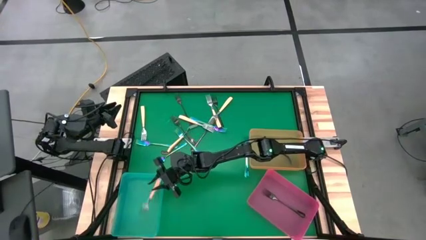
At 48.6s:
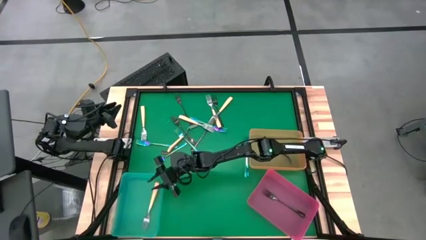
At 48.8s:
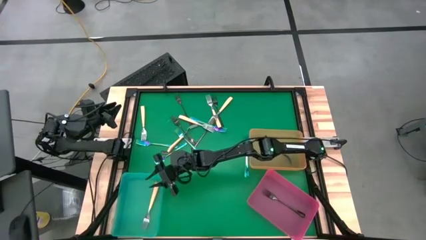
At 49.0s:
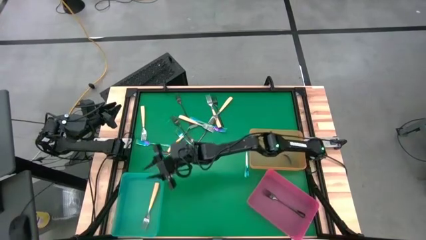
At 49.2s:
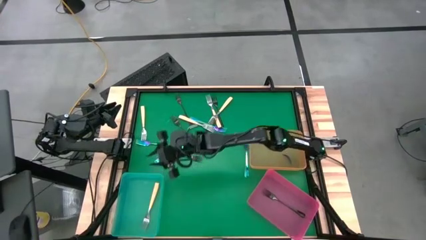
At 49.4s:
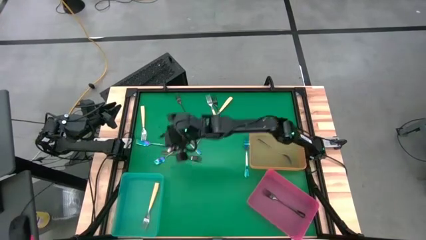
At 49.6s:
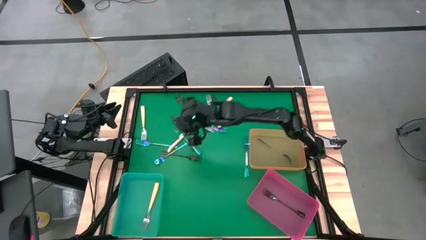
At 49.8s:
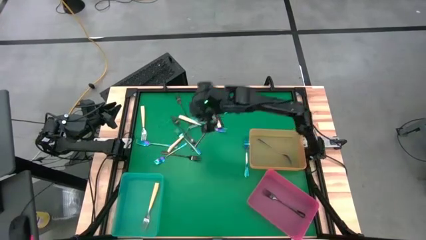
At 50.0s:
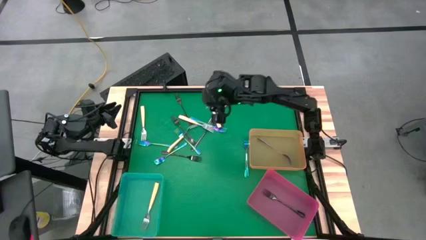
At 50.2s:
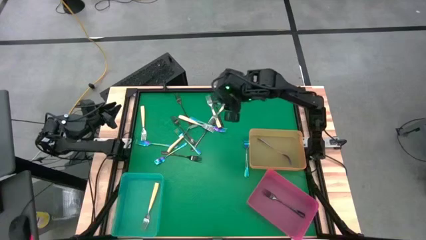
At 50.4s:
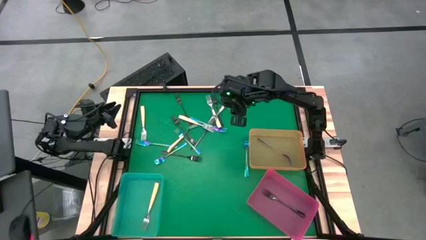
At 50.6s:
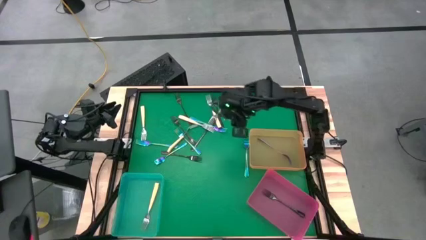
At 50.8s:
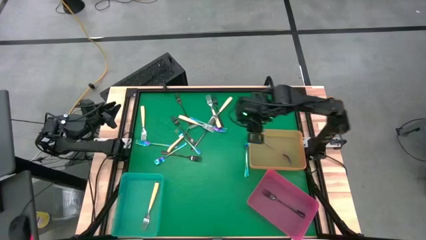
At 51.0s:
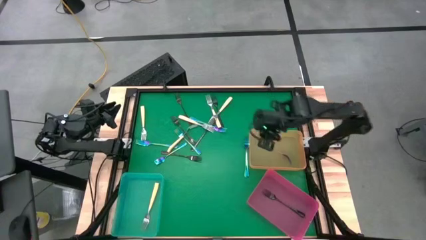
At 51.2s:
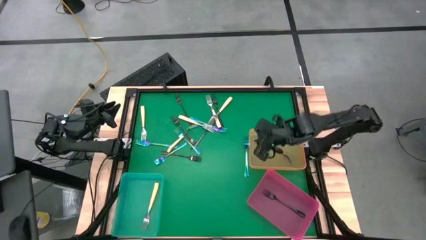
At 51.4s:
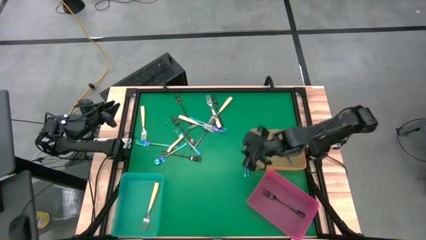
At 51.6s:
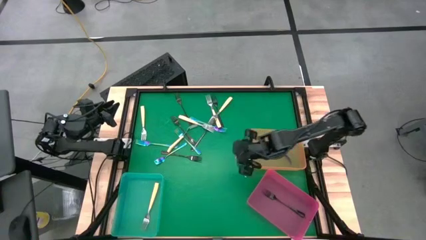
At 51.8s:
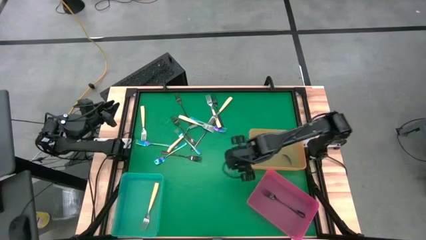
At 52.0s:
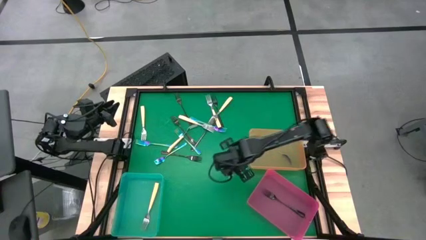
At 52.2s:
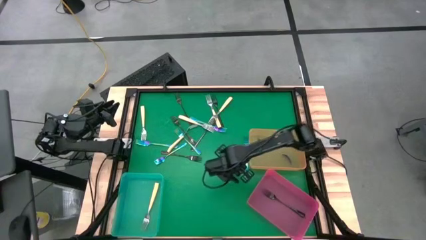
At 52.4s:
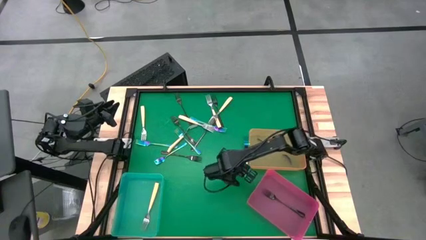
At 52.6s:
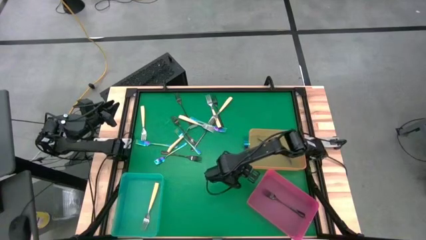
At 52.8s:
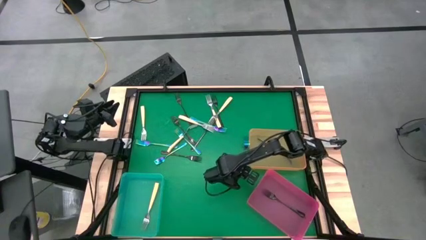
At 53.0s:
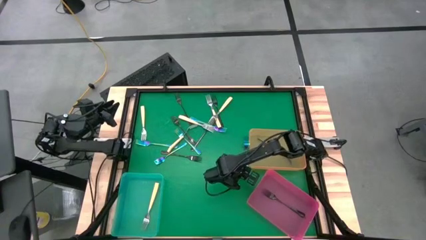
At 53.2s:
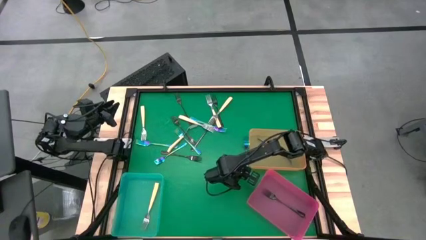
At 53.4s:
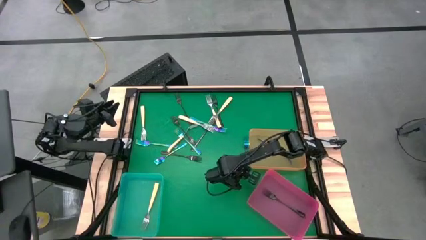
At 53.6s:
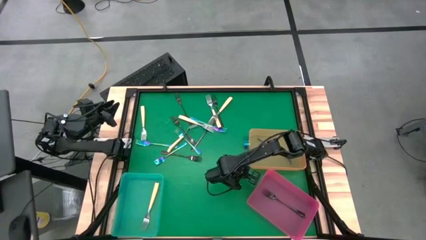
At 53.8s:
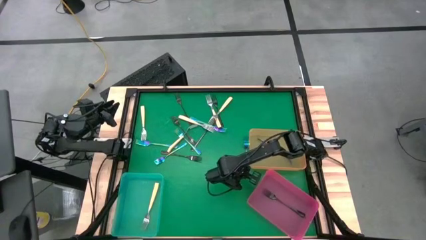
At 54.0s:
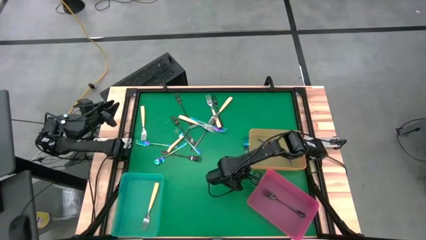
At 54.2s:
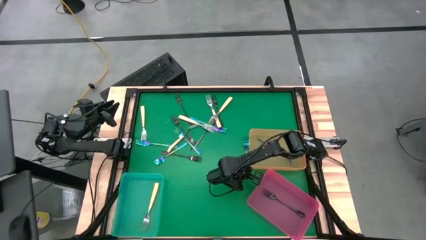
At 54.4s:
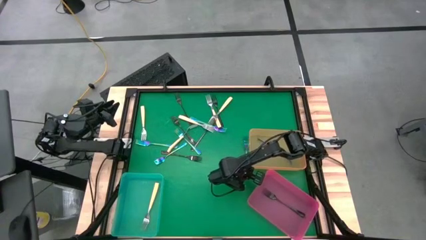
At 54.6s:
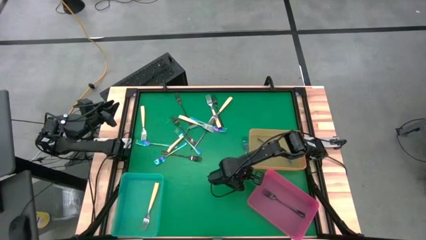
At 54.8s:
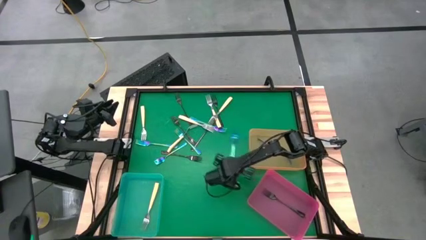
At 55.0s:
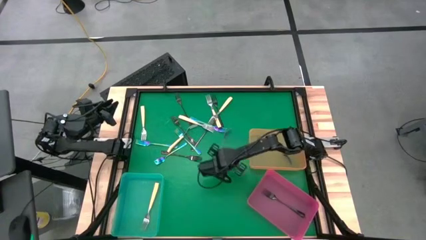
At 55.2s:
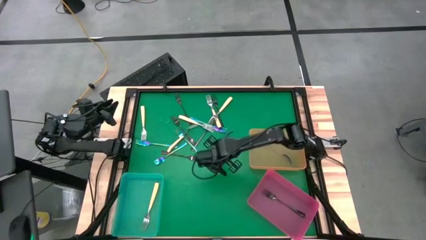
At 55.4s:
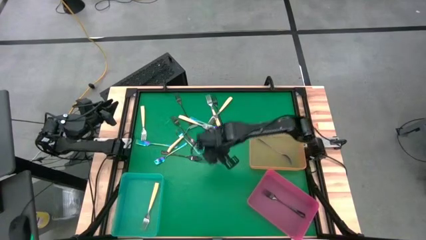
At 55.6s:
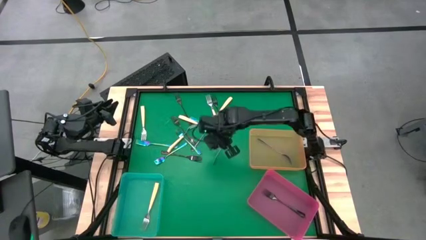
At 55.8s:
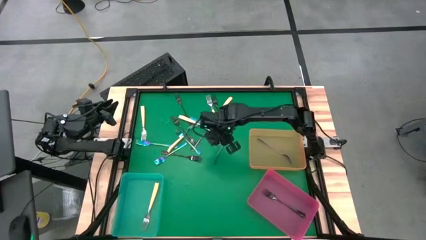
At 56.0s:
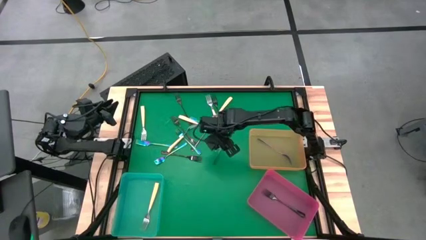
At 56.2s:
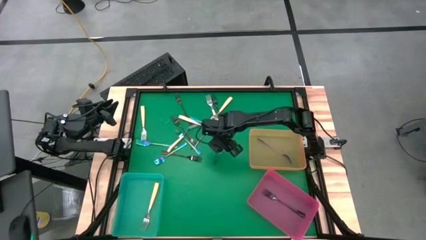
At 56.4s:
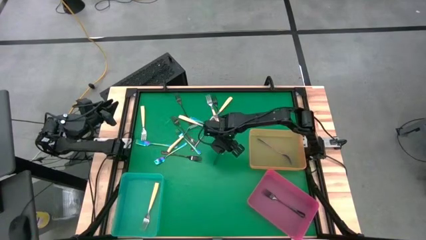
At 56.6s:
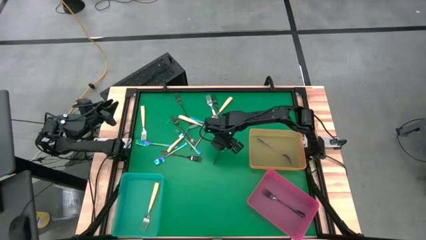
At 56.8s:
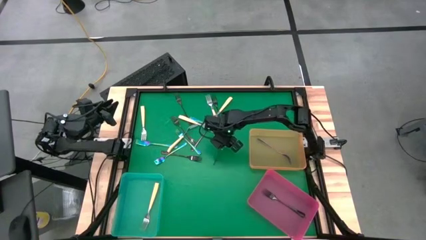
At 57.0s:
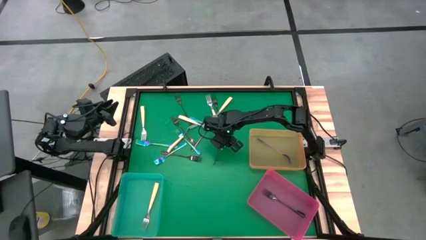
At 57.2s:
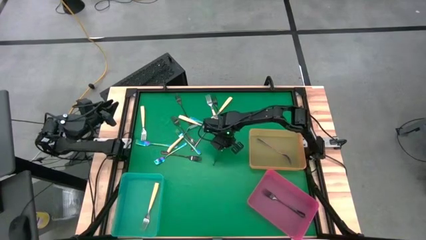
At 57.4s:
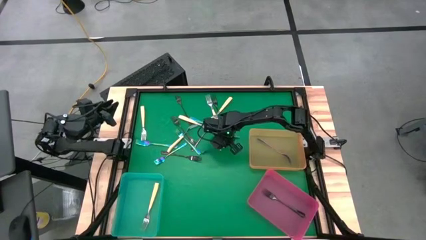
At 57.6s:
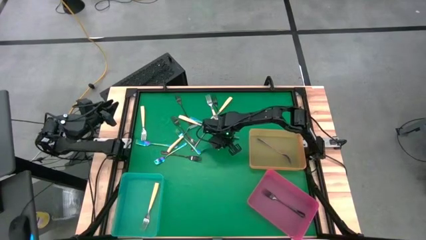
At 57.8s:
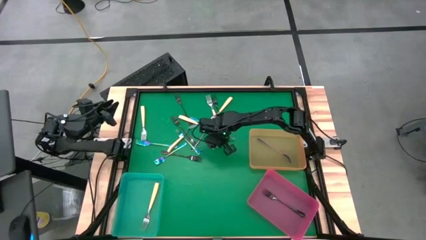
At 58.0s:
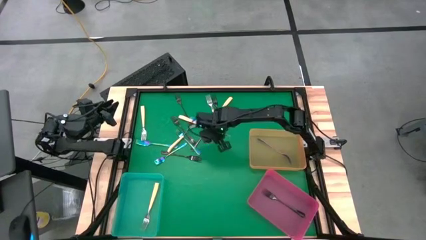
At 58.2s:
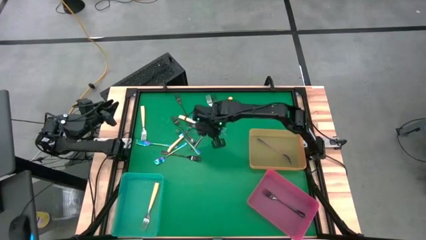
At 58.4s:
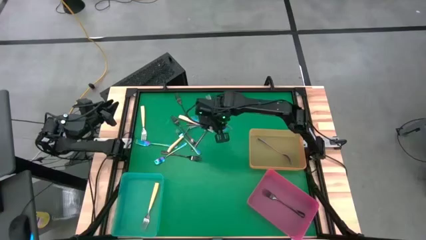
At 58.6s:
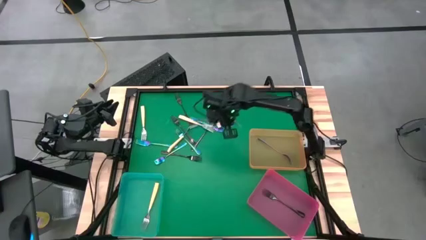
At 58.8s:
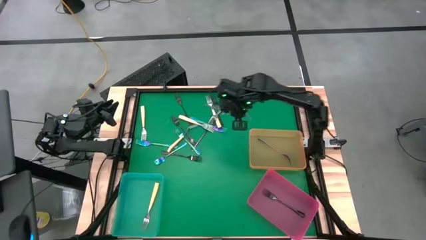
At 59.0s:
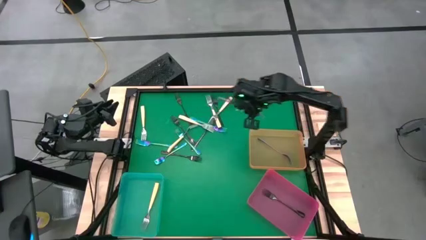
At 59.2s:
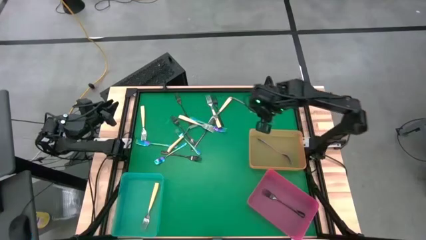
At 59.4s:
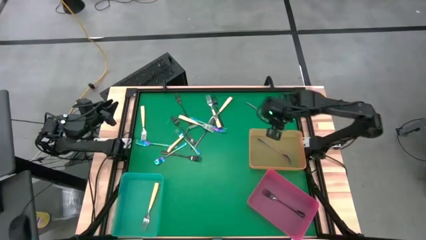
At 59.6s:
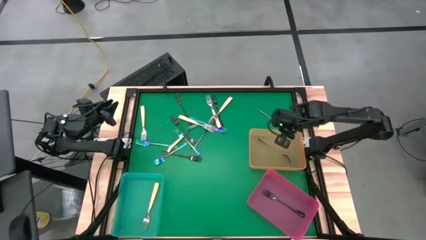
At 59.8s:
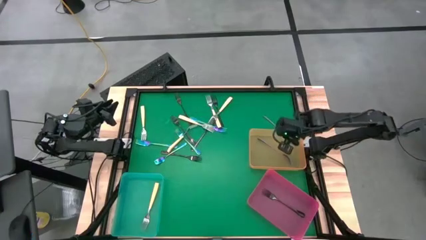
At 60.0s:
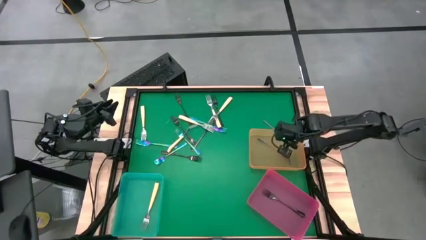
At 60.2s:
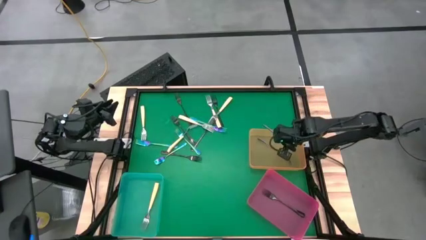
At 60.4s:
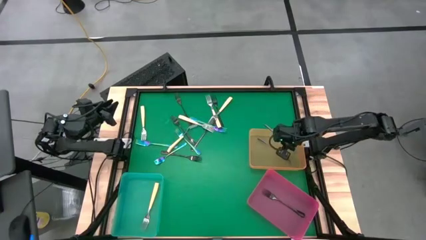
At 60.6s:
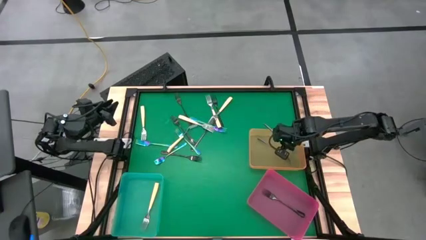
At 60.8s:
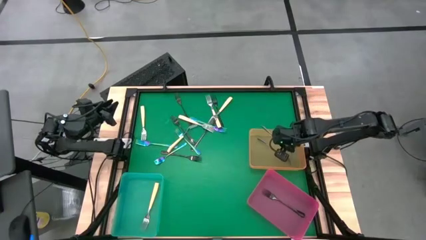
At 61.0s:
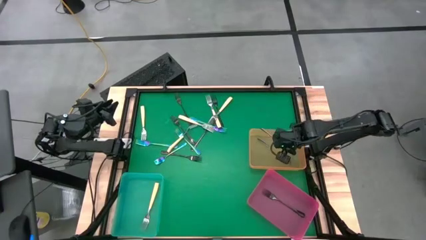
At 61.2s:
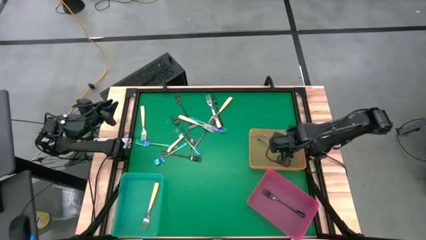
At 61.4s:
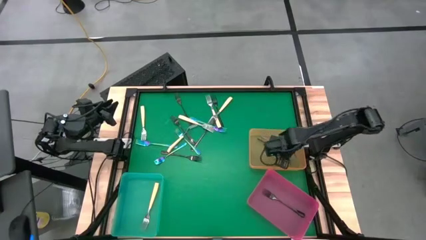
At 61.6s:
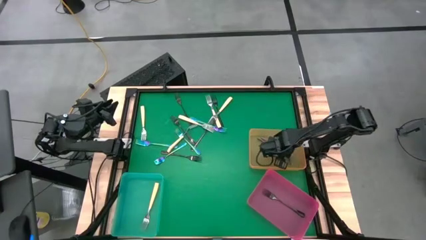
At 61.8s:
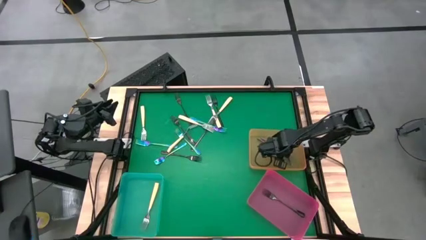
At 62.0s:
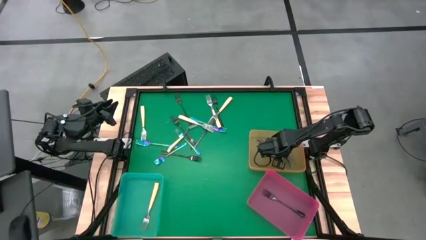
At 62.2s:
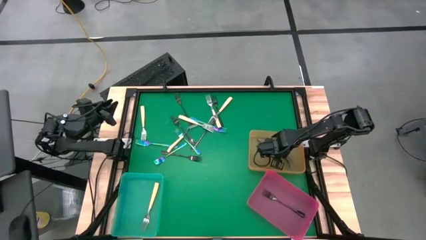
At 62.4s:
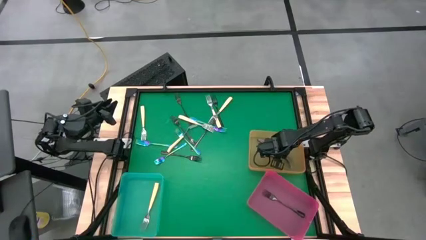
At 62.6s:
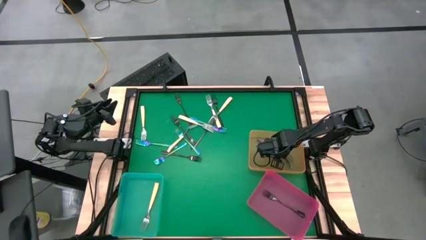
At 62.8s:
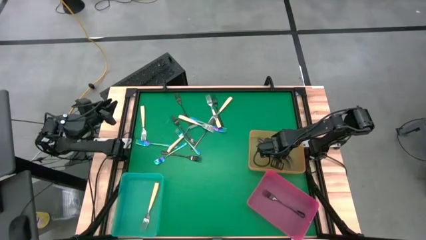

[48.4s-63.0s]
Task: Sort silverware by color (type)
Put the blue fork into the orange bin

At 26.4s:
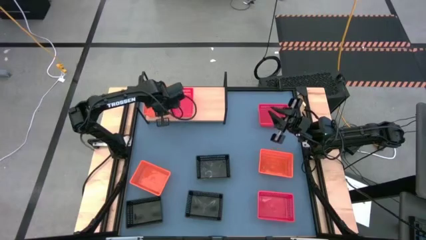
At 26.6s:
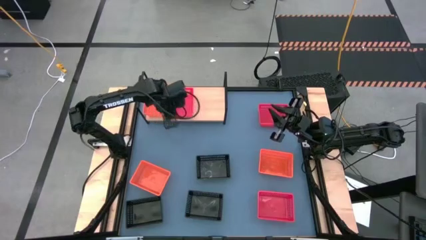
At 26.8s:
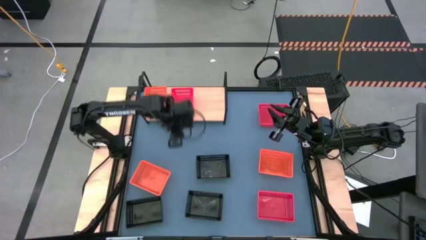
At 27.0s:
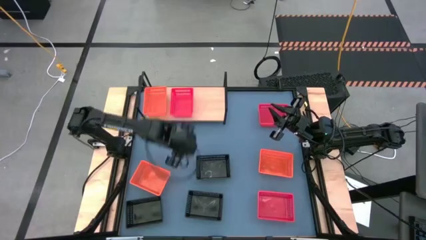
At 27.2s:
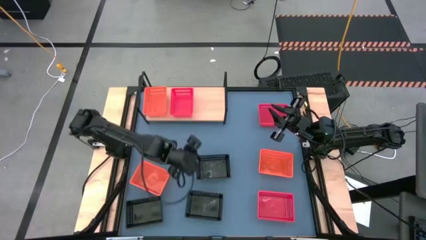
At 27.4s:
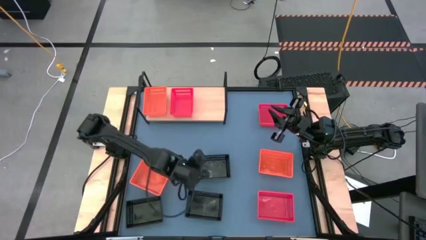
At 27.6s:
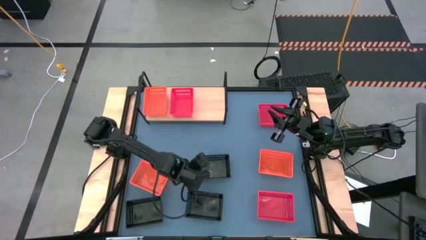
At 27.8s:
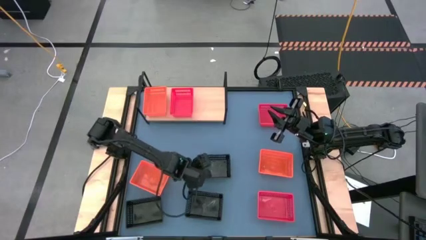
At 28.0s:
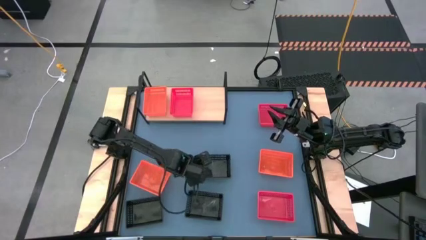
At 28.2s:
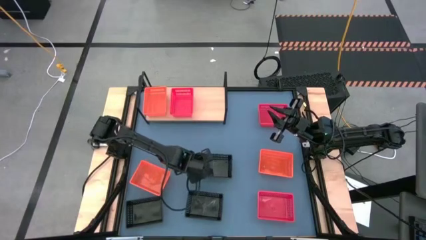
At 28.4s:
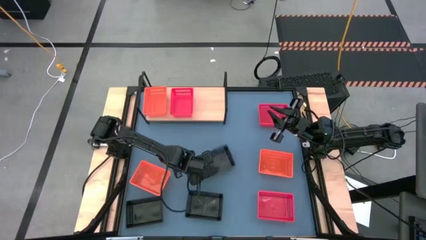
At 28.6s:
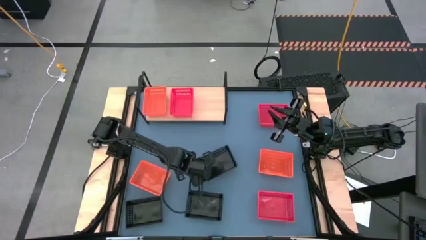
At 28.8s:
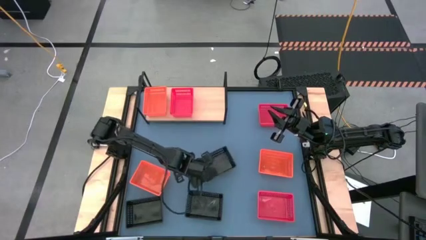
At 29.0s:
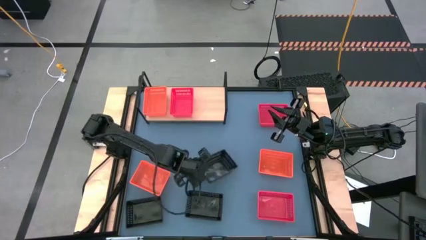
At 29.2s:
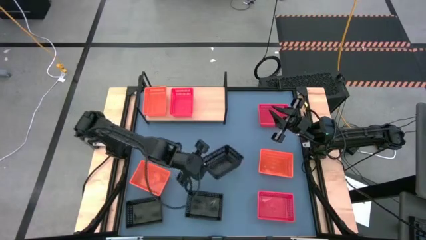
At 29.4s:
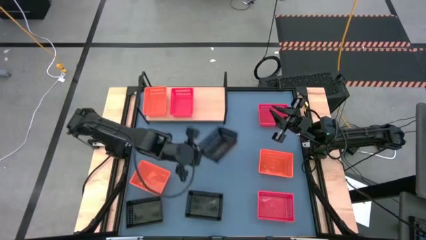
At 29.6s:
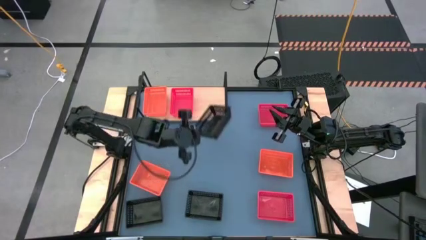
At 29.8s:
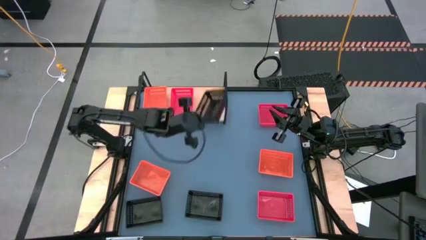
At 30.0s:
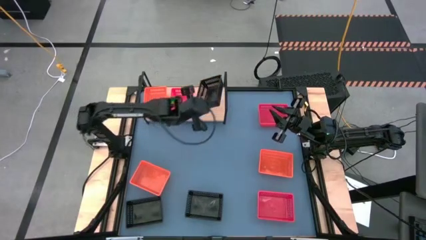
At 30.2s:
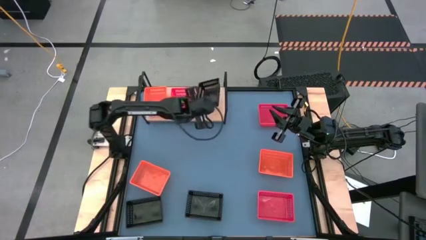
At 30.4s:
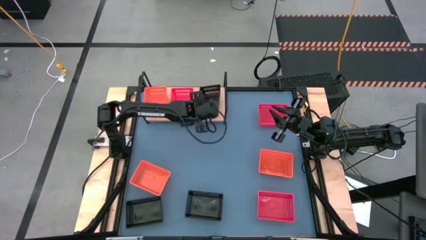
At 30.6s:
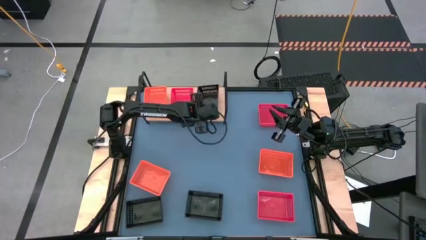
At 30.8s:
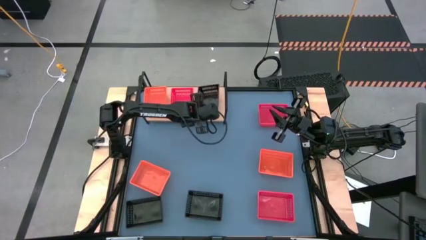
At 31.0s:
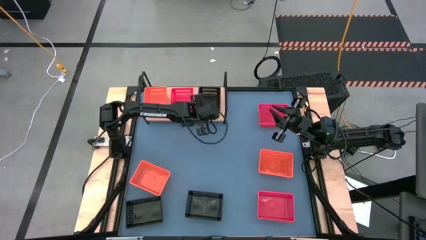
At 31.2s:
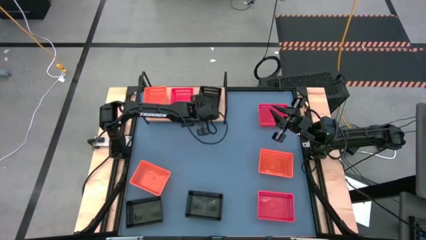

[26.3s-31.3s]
Task: Stack baskets on shelf by color
Put the top black bin on the shelf
